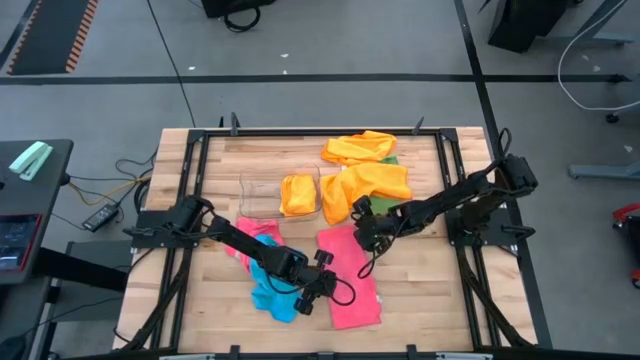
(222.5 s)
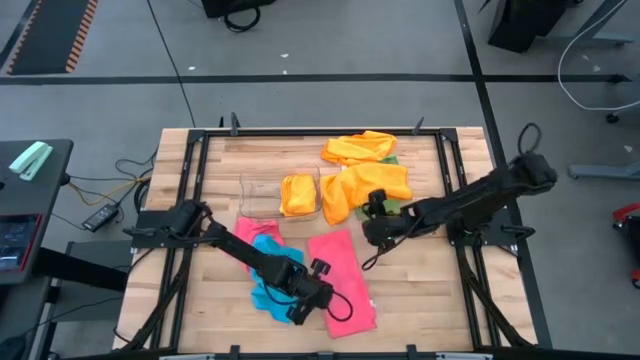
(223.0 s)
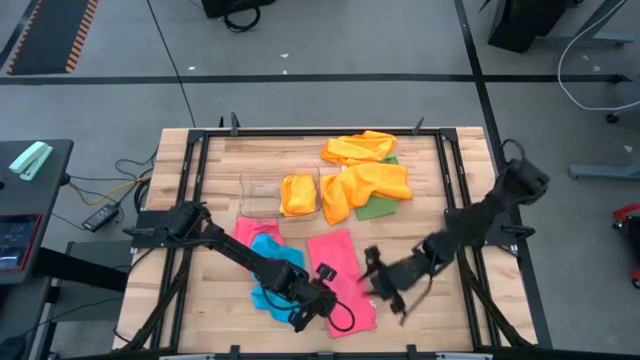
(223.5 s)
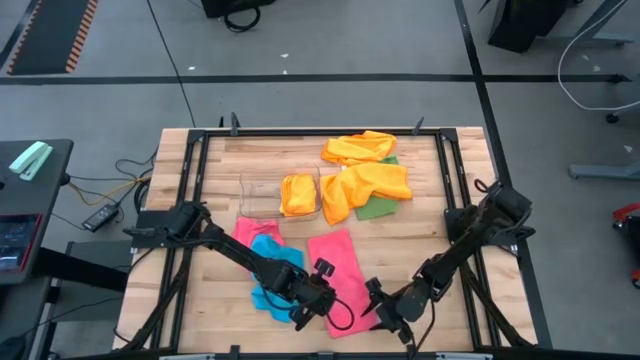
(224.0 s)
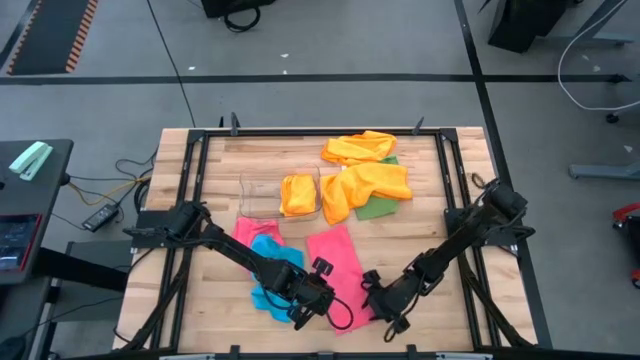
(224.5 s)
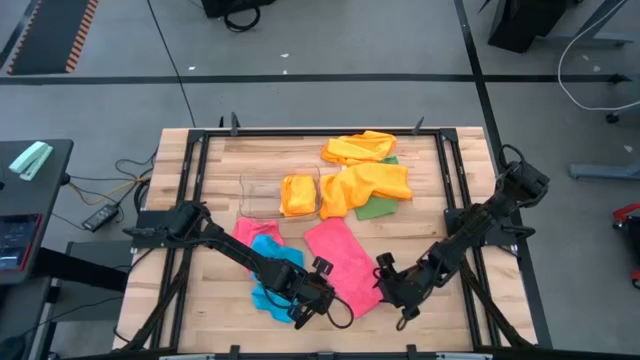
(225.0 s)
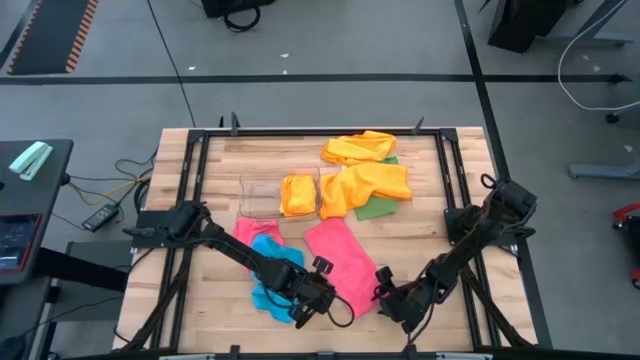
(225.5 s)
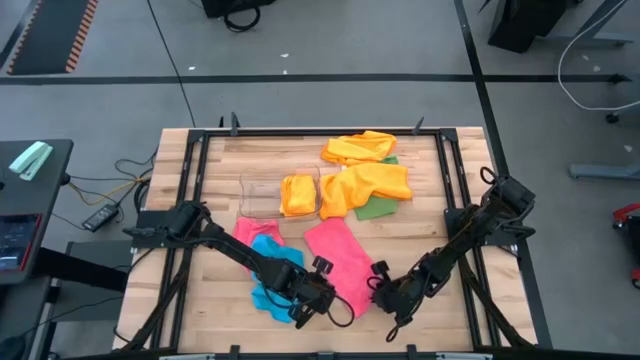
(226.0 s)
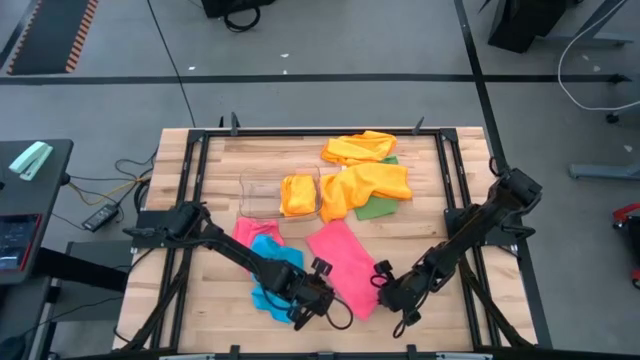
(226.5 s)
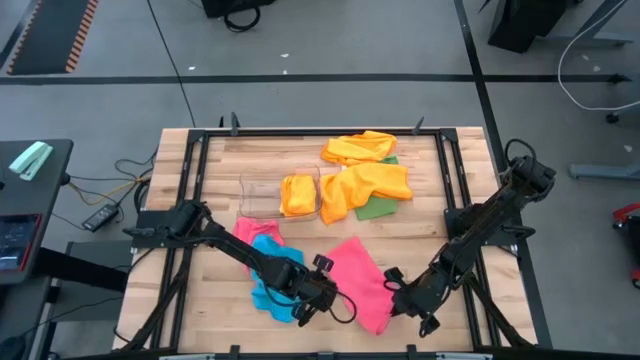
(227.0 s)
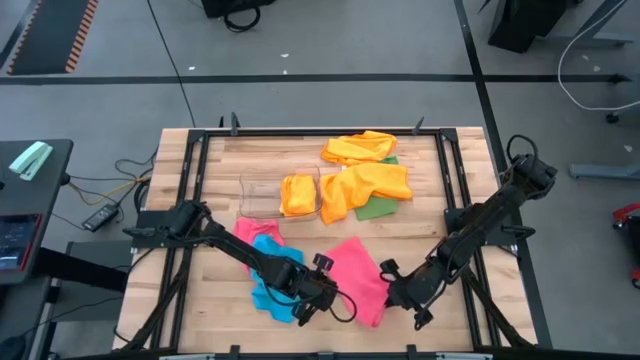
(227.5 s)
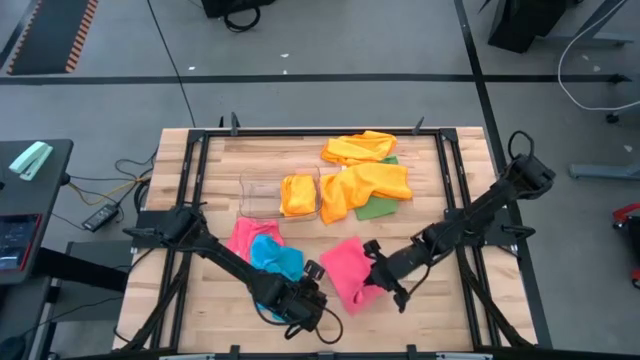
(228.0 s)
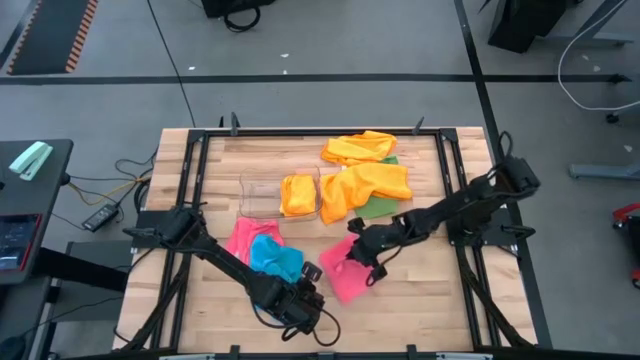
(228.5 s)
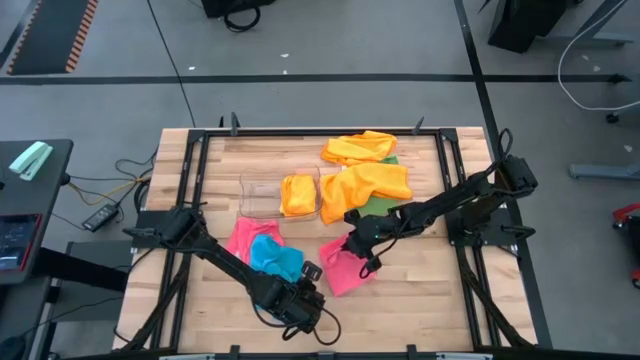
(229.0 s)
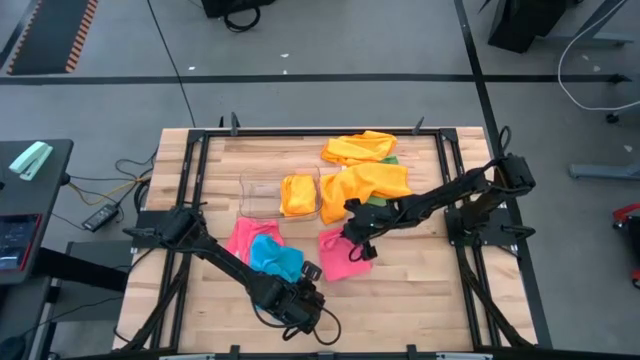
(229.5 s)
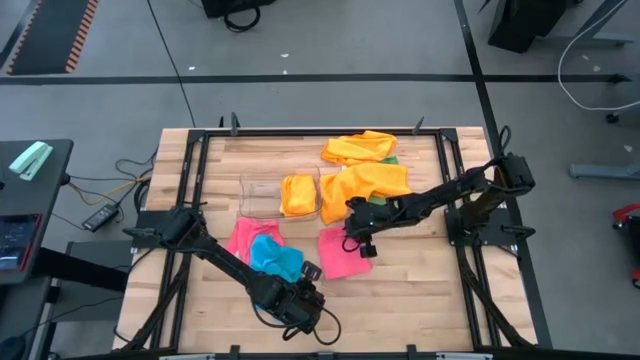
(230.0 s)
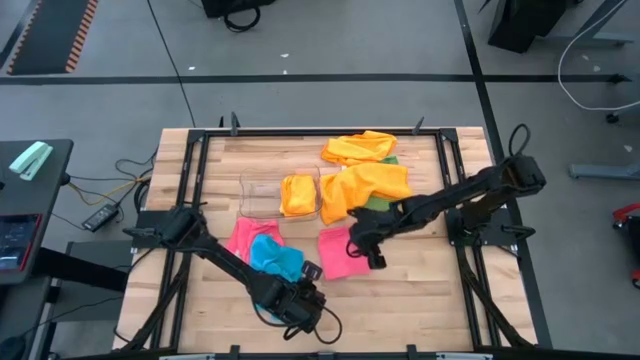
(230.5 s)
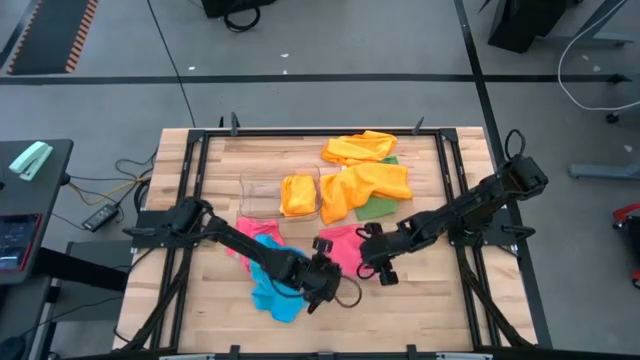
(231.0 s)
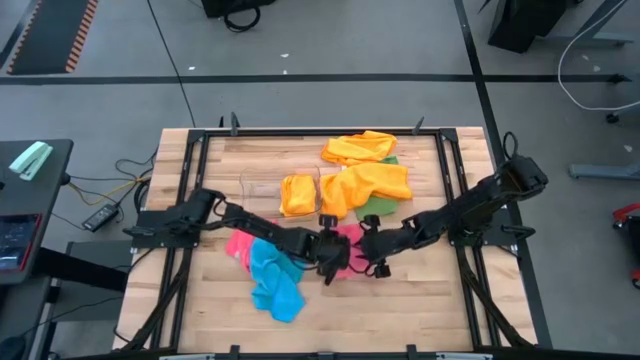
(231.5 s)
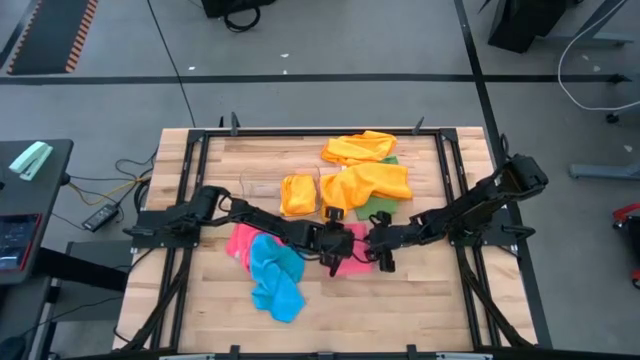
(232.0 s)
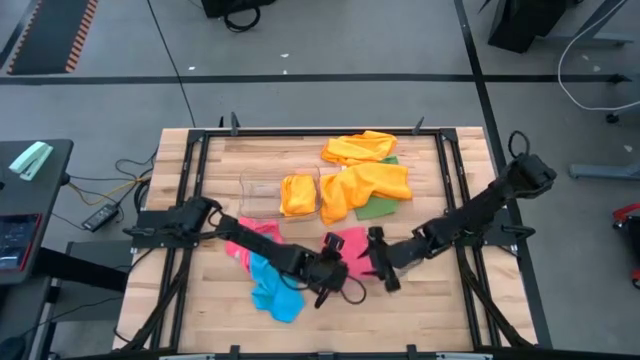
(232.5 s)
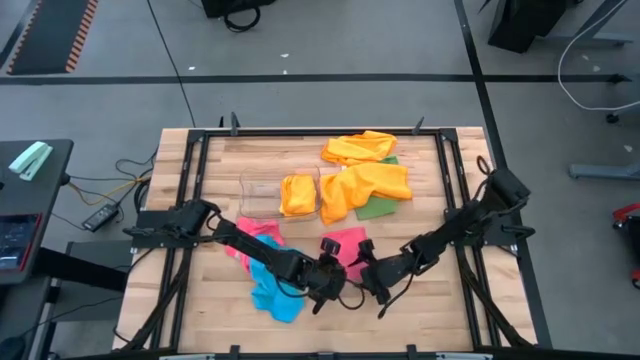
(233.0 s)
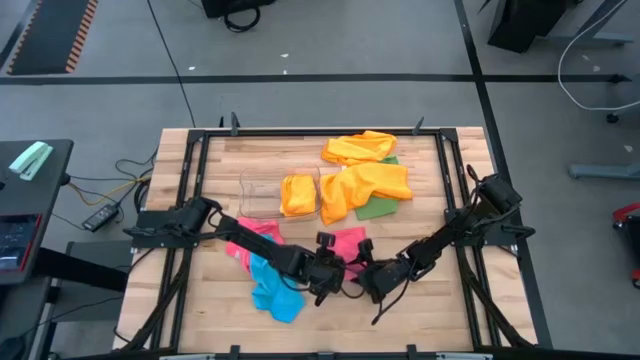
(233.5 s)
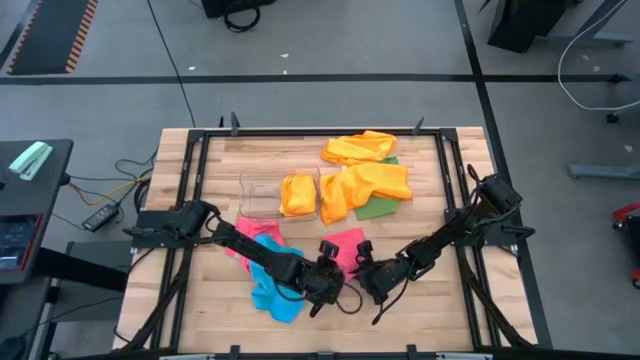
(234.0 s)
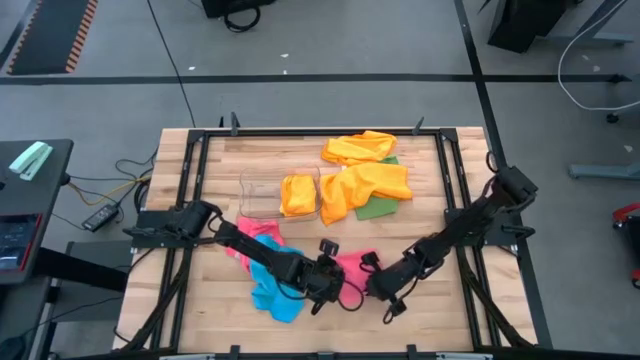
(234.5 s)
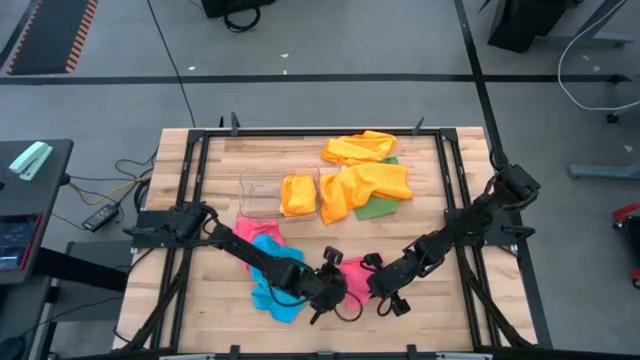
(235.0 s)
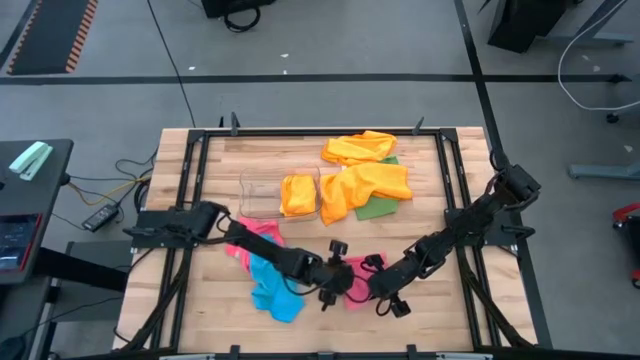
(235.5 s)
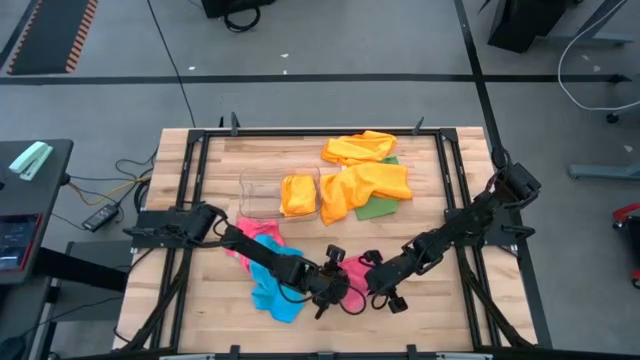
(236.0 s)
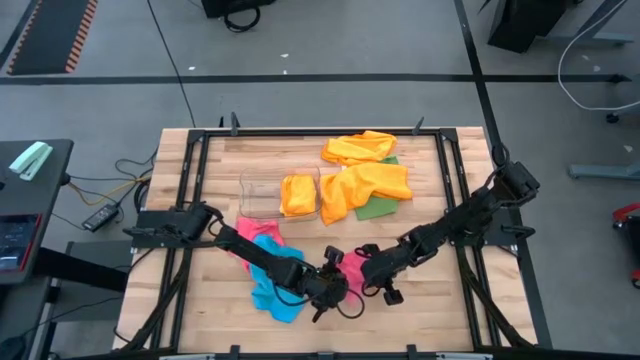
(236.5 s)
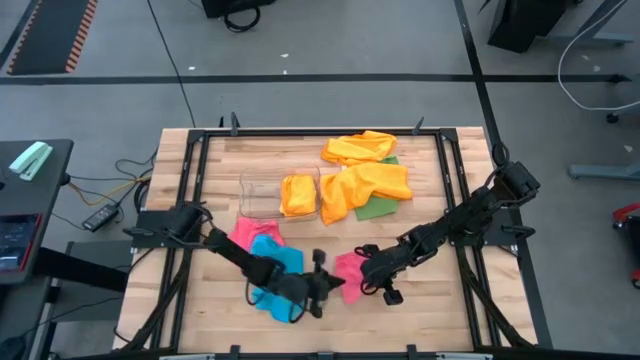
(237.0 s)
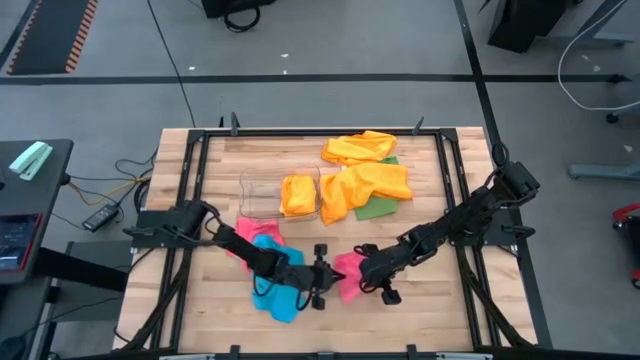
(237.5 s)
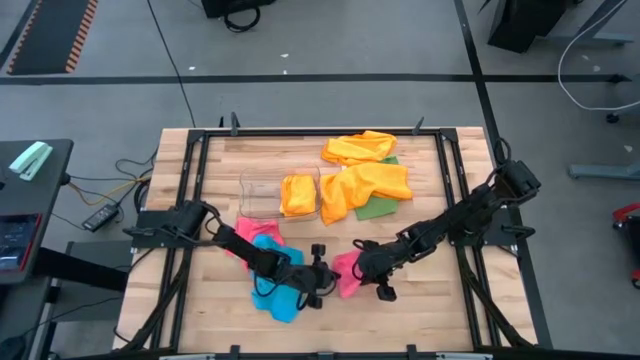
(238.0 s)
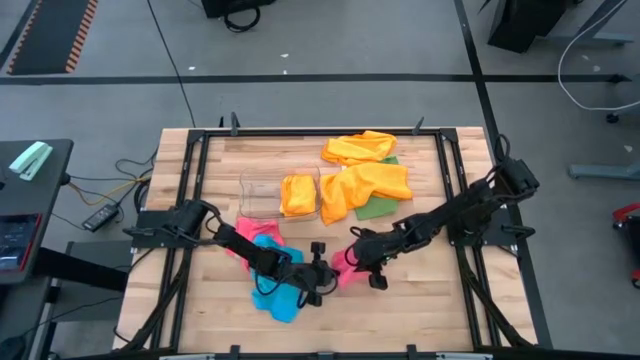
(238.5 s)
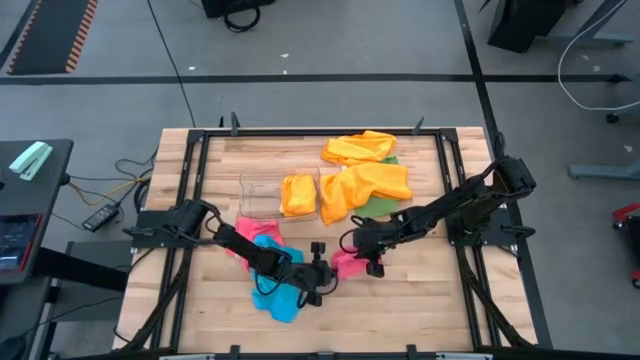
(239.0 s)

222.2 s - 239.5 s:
Task: Fold microfiber towels
Fold the right pink microfiber cloth
